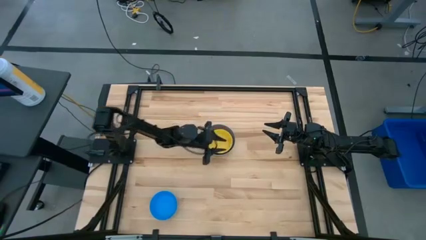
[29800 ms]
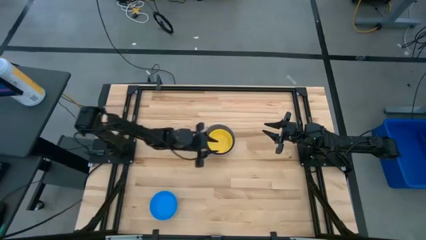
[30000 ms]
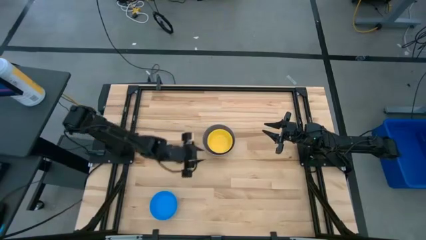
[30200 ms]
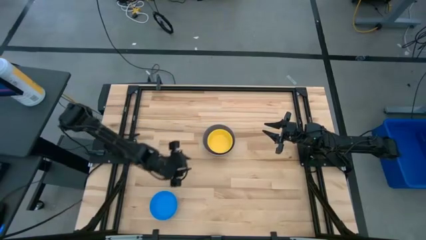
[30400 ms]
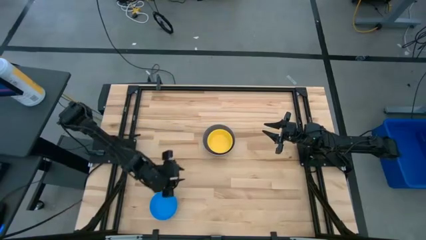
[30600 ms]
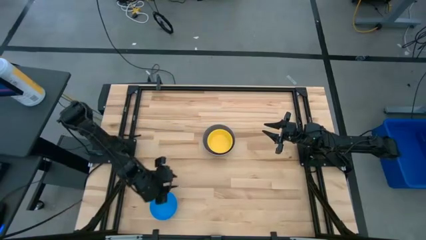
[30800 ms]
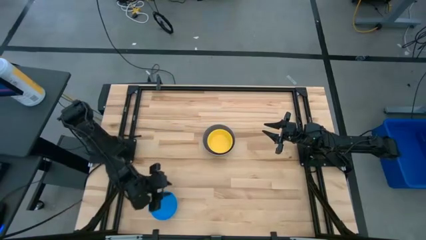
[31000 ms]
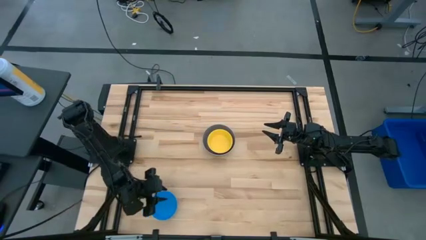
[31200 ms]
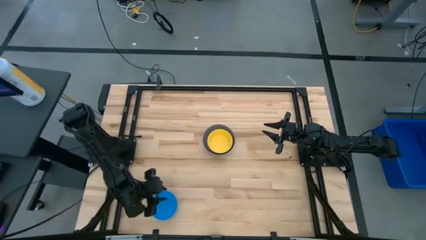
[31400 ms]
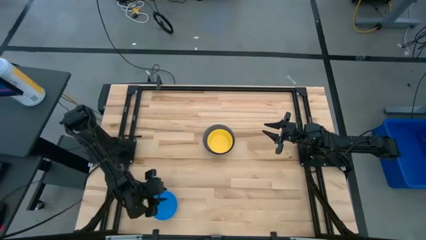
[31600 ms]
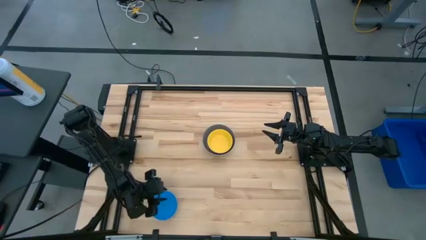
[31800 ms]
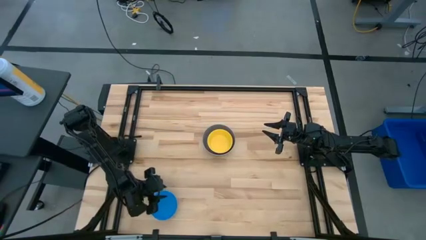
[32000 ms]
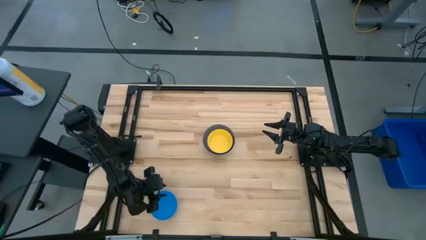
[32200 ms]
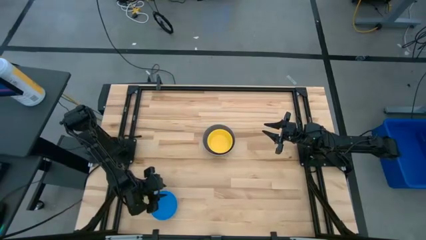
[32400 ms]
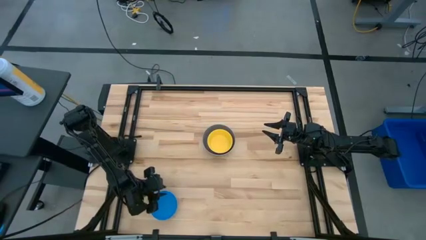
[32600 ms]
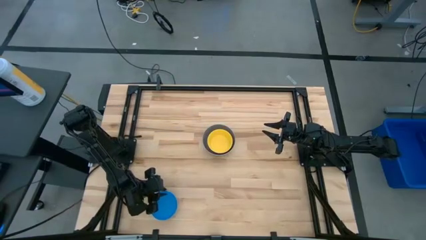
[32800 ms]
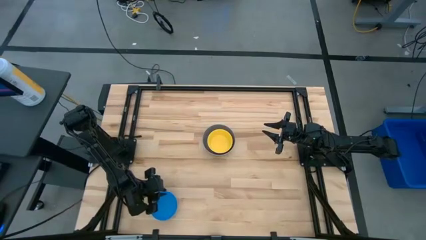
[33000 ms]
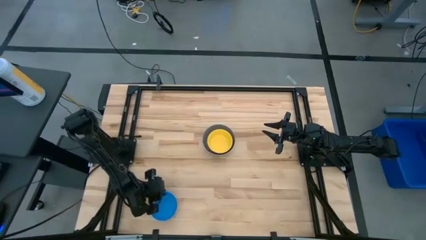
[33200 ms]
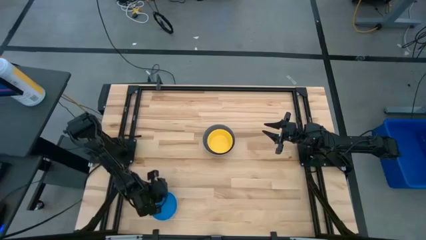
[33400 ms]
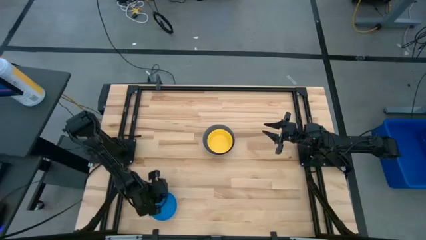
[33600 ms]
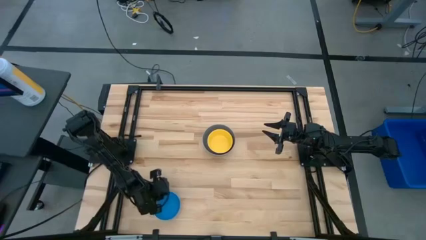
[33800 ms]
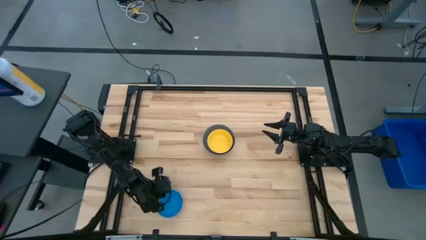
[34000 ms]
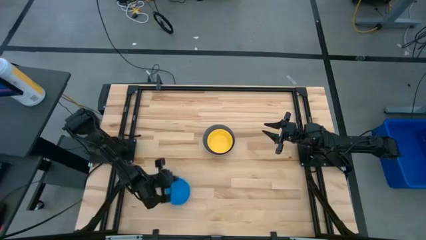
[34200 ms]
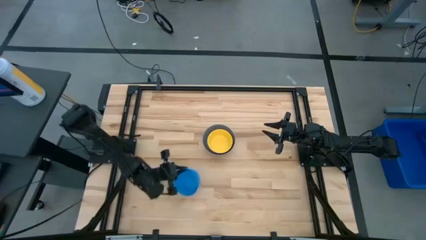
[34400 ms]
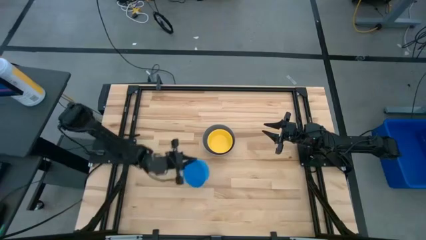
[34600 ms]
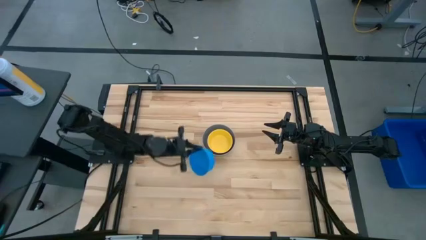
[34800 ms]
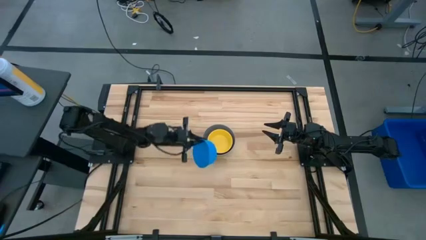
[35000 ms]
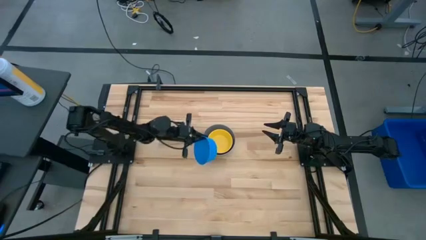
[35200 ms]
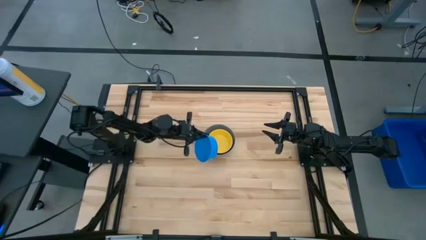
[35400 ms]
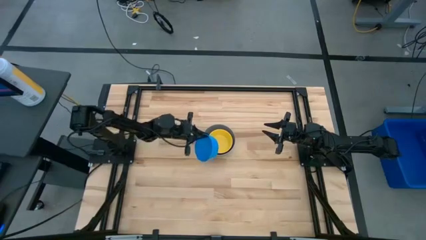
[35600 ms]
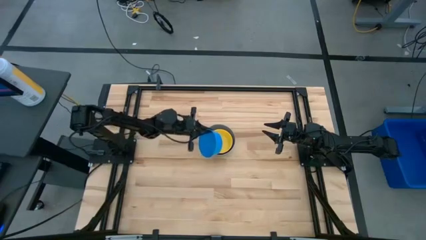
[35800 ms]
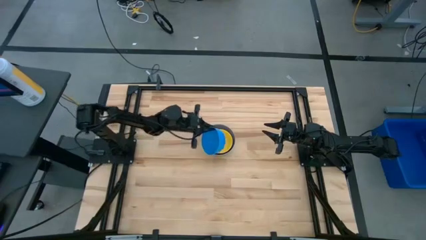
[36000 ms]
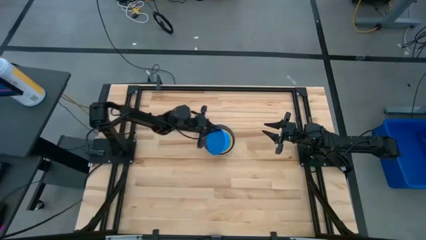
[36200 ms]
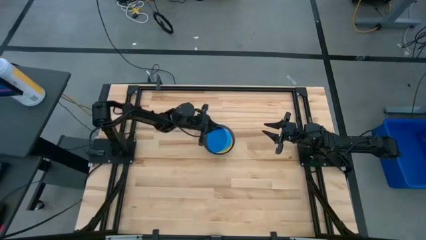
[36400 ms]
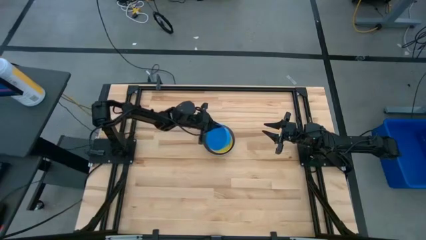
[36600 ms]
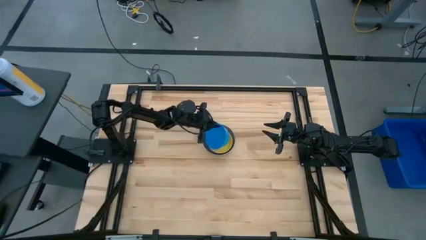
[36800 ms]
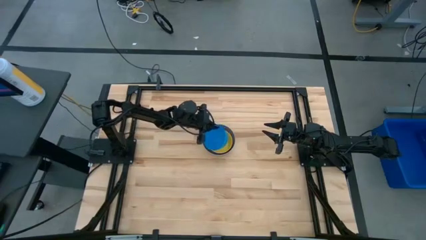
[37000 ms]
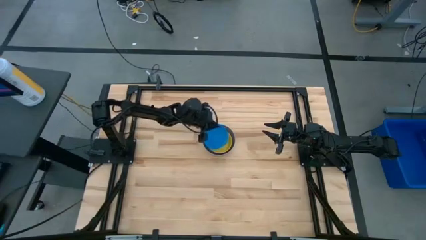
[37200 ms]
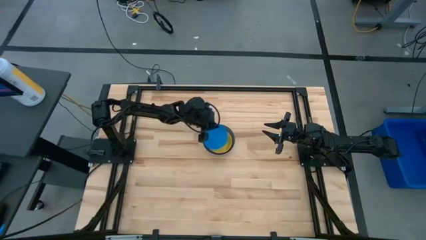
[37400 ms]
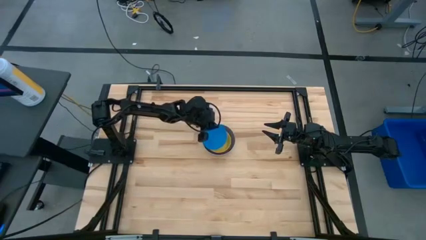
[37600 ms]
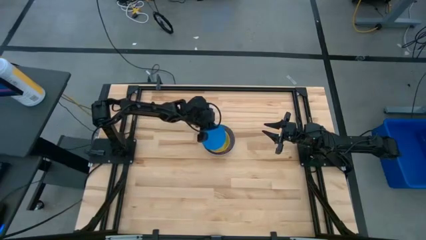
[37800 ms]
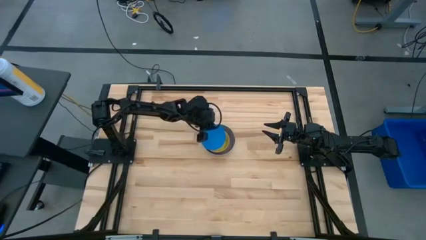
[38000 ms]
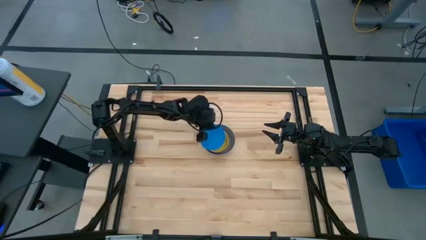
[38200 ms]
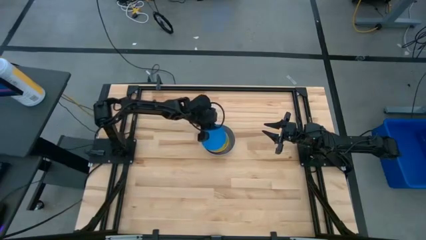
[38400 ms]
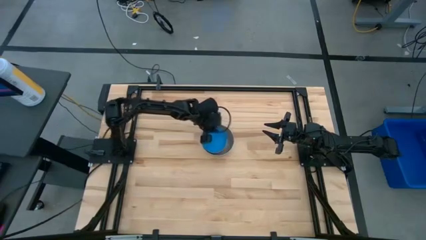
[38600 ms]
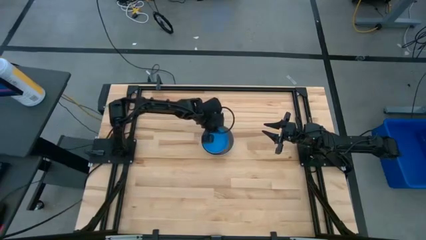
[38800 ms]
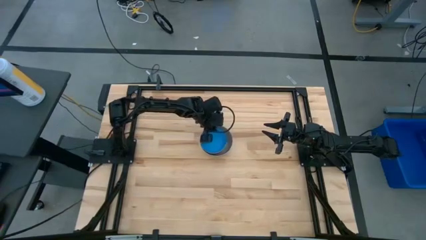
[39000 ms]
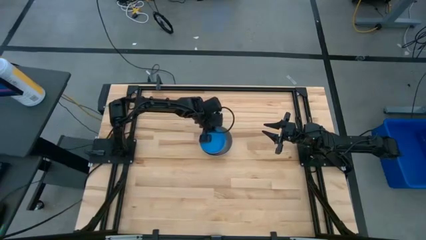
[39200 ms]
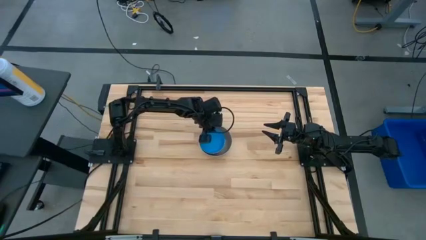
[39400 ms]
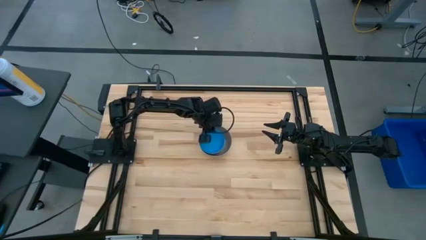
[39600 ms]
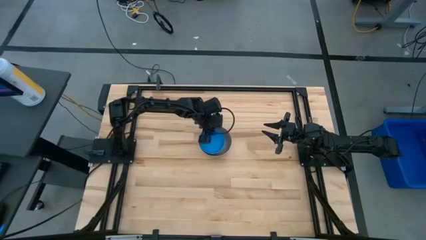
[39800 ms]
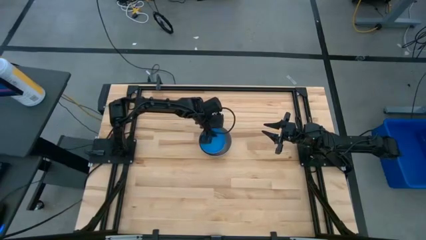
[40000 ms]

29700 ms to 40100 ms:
Stack the blue bowl on the yellow bowl
